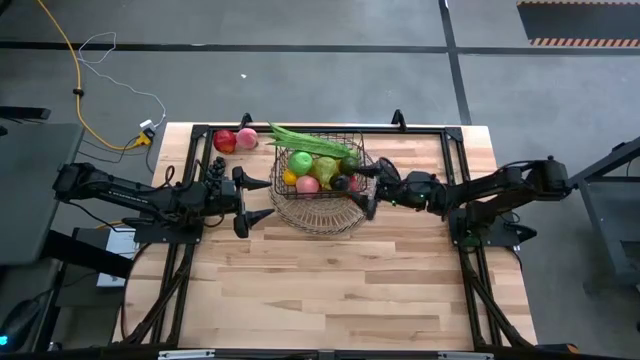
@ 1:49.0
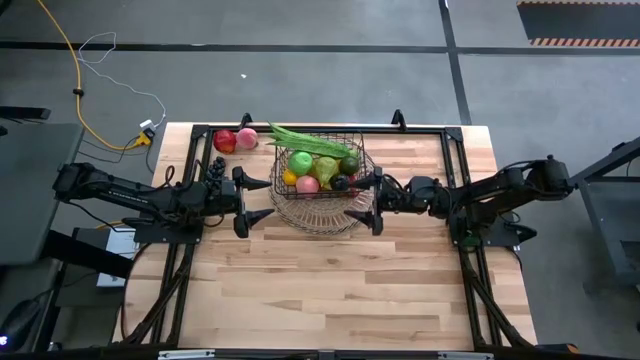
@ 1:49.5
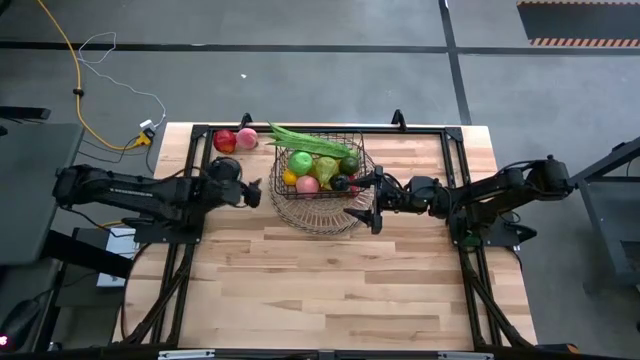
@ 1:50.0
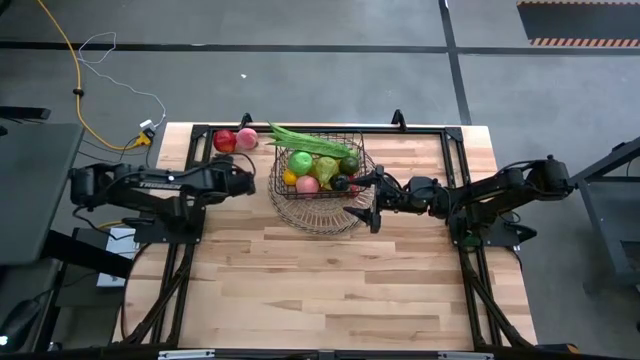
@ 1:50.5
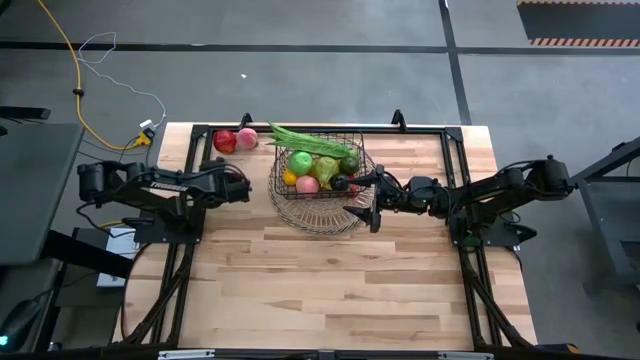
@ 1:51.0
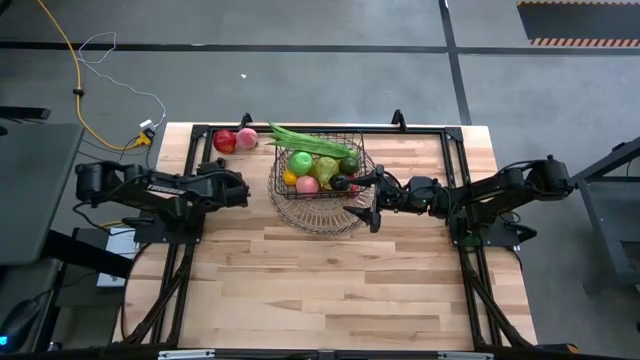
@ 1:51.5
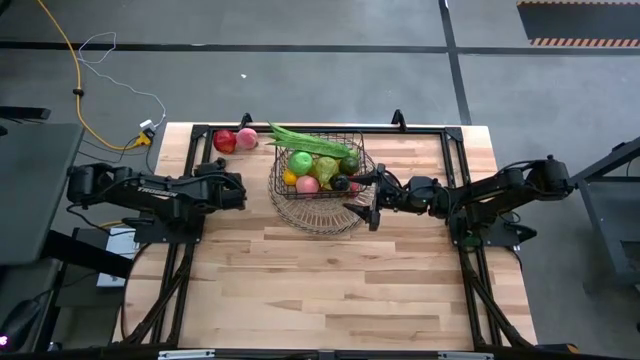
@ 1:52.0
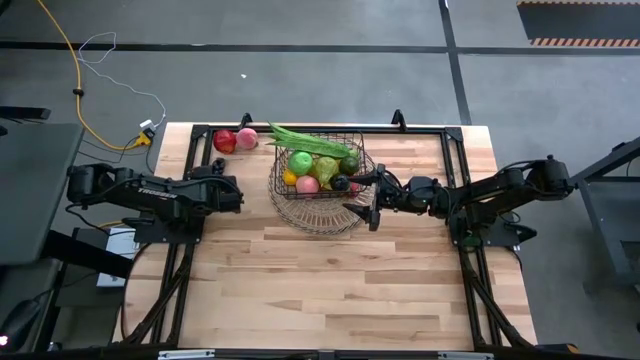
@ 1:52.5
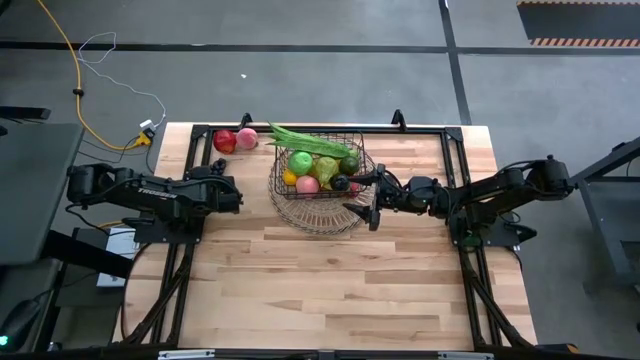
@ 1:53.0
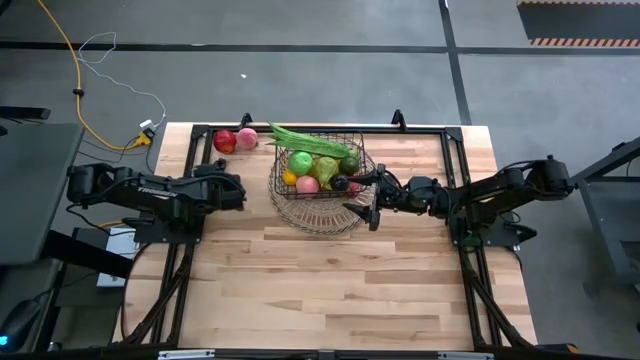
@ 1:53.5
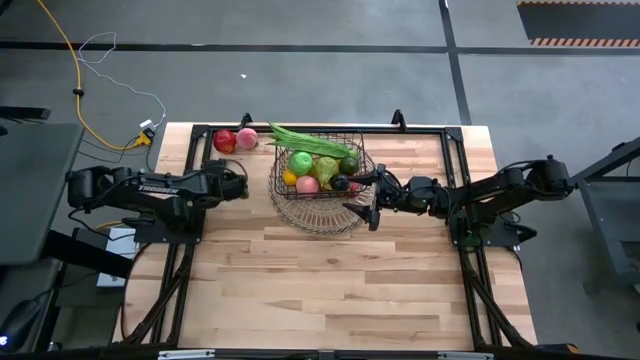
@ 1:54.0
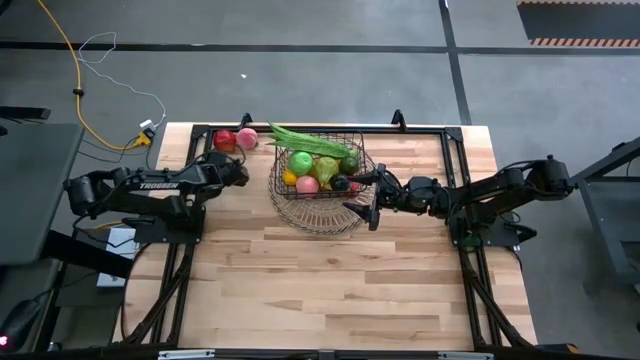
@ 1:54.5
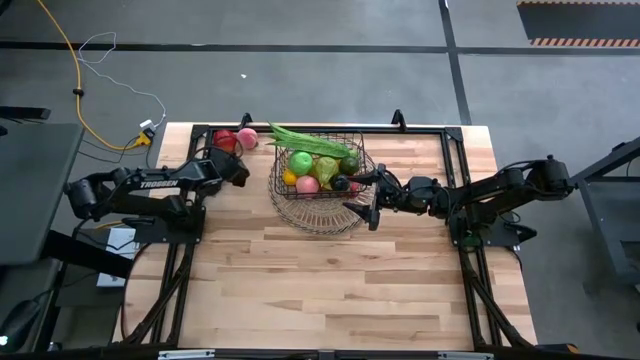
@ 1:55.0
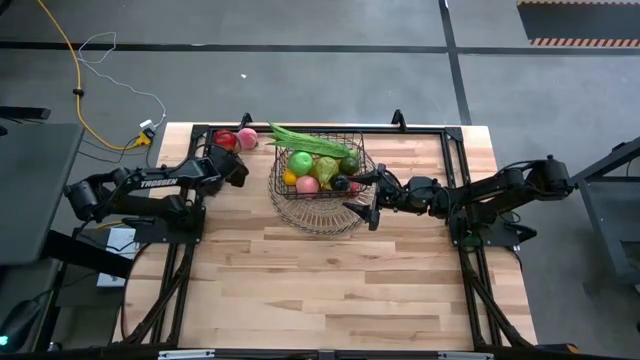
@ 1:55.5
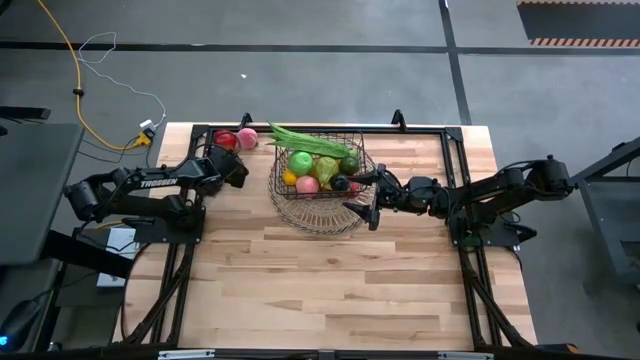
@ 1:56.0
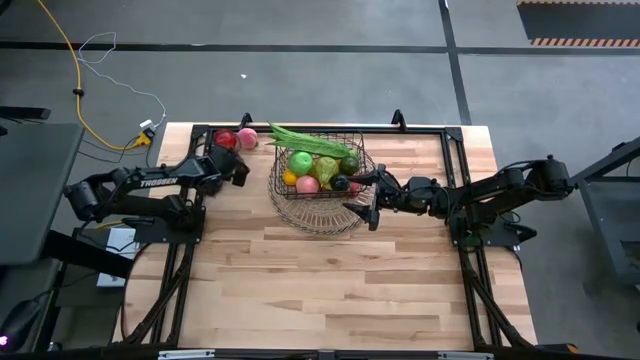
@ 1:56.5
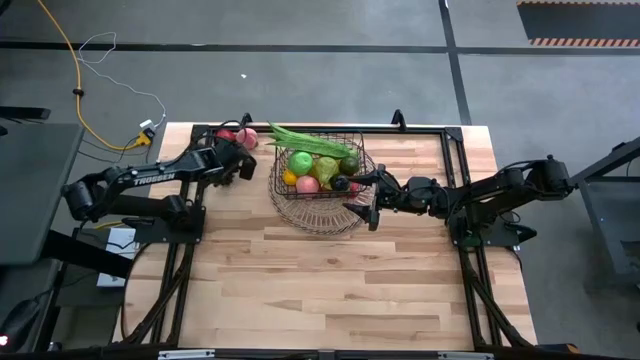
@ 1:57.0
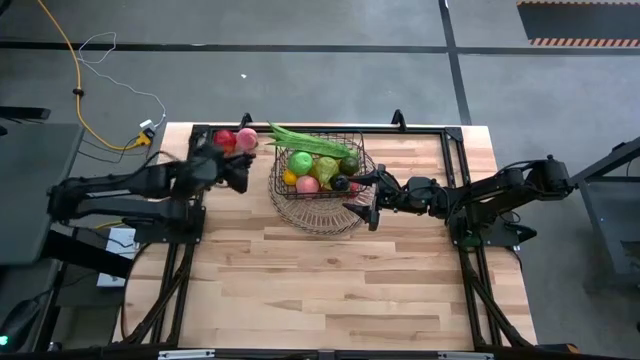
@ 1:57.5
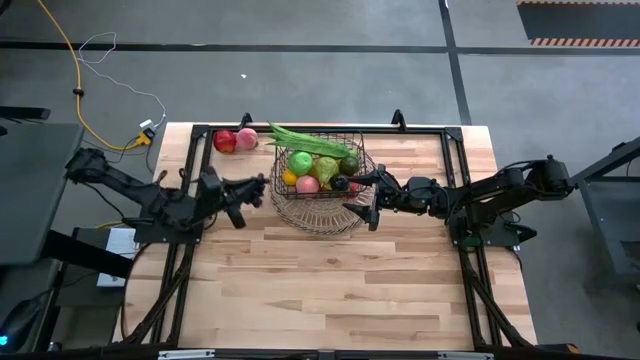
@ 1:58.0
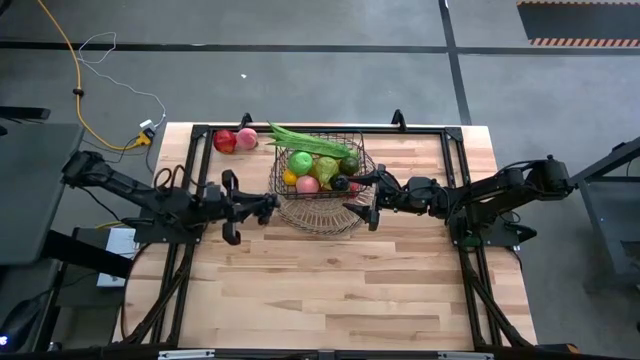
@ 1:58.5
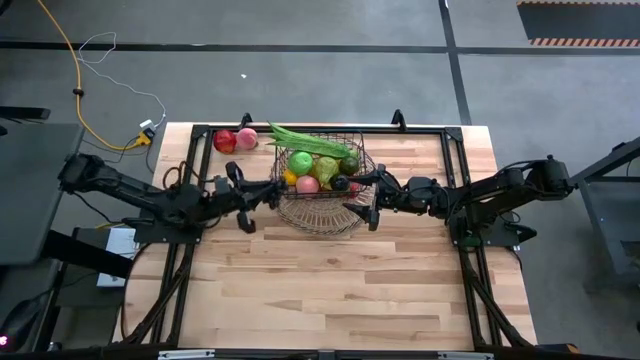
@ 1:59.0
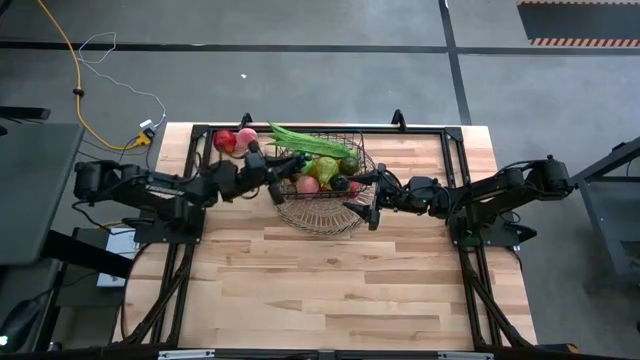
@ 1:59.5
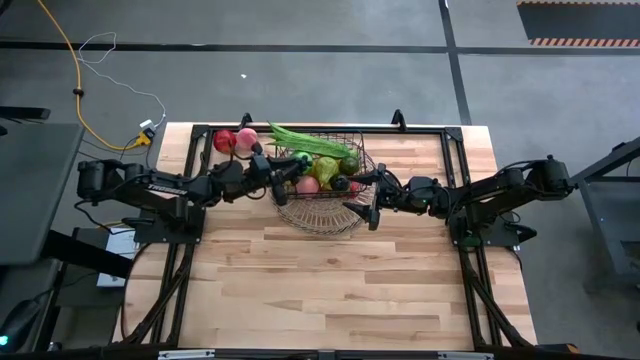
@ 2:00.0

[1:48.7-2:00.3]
Task: Build produce basket
Put the grapes into the wire basket

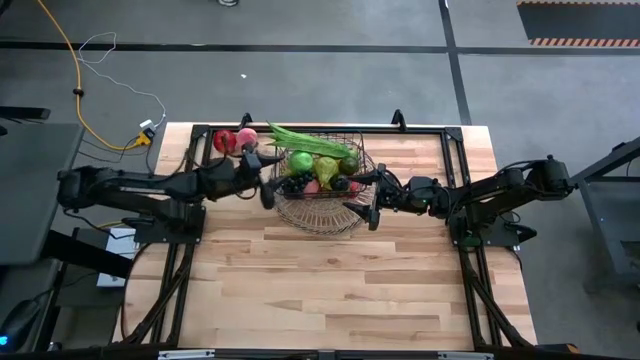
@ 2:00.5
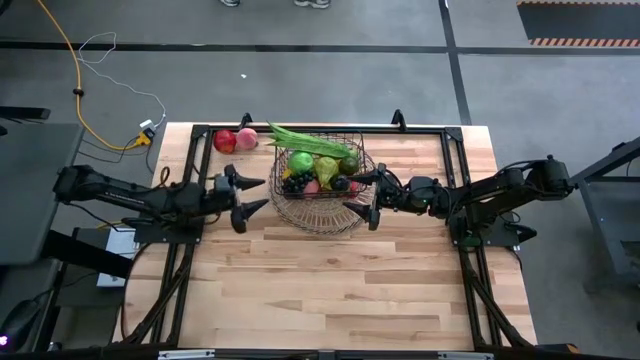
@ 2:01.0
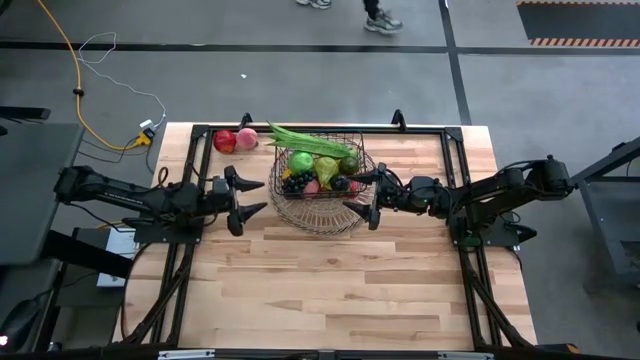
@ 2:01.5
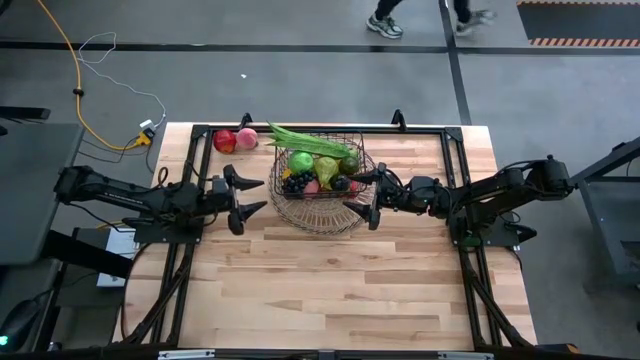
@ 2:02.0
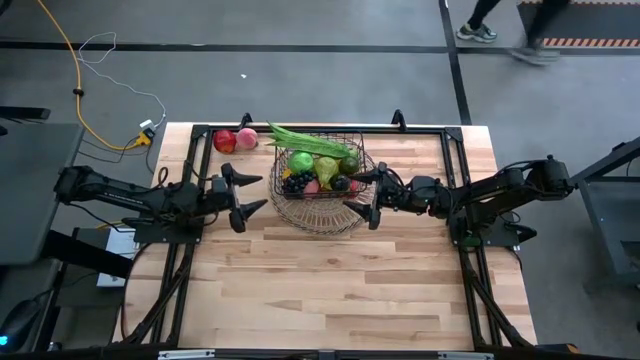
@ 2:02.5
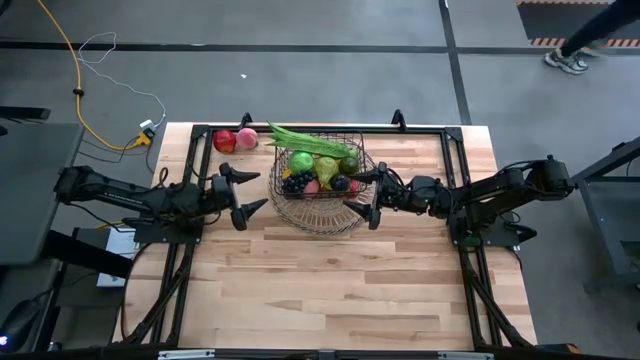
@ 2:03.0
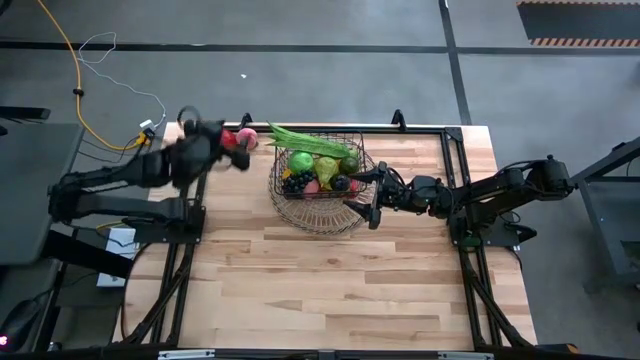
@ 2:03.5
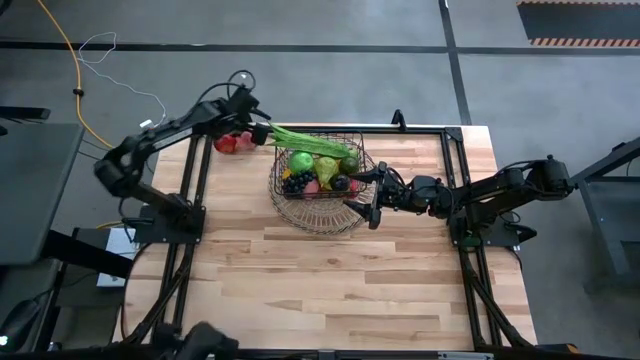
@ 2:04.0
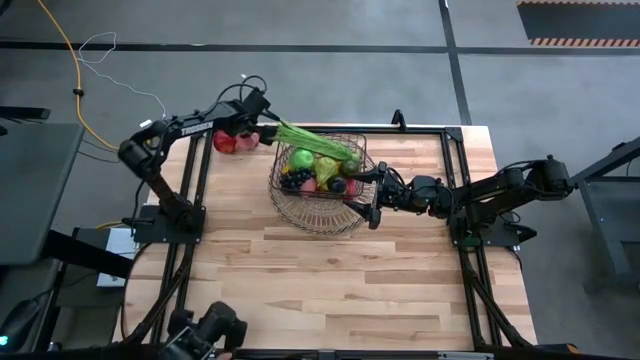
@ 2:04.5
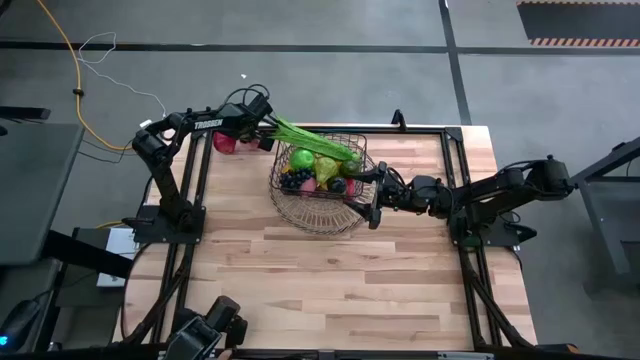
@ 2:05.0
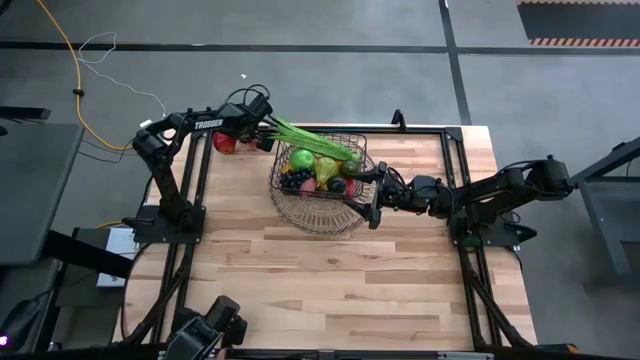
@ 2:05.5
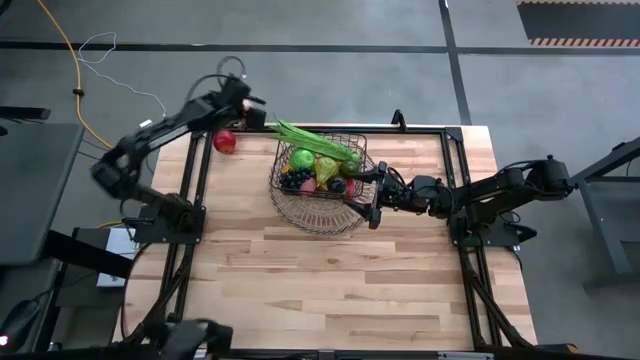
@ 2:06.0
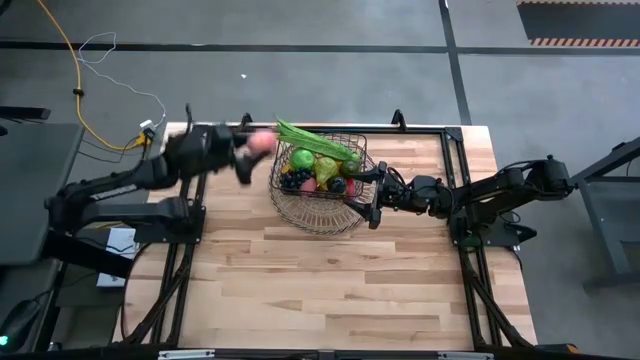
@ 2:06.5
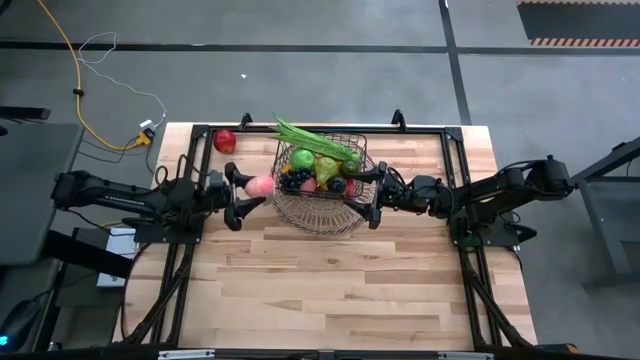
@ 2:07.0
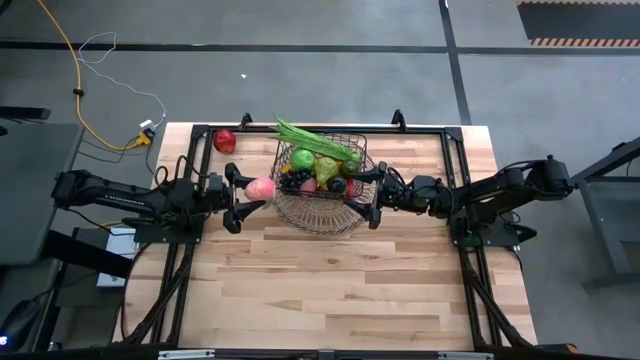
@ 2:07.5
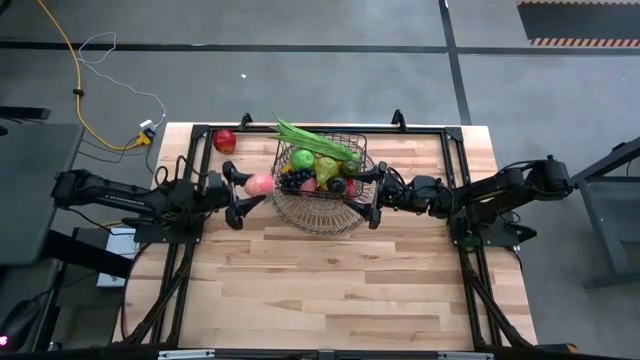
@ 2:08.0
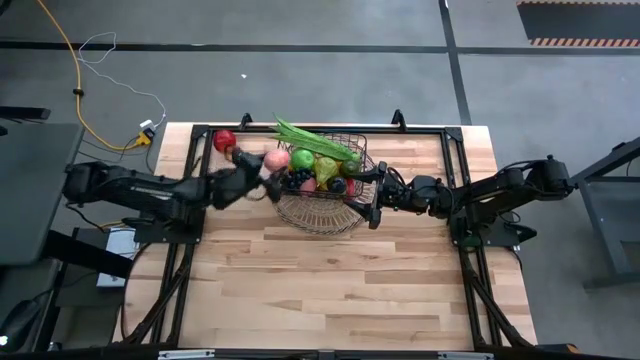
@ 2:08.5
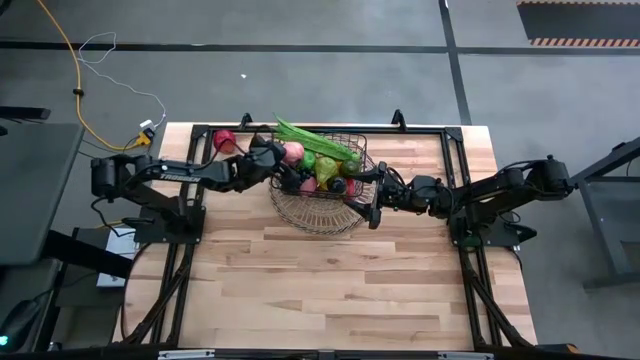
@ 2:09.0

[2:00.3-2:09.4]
Put the peach into the wire basket

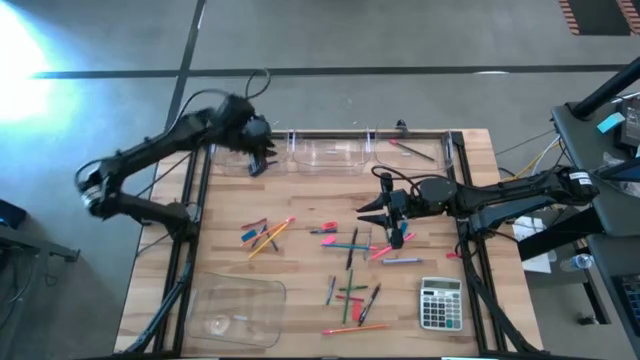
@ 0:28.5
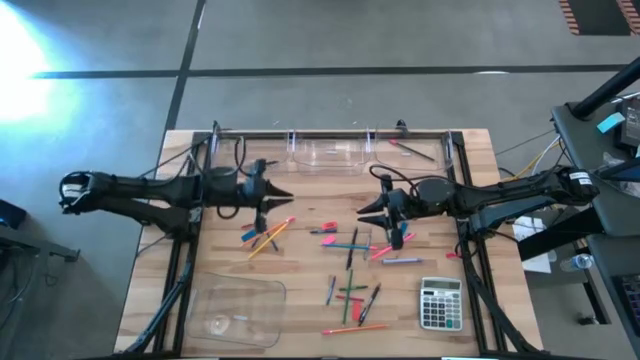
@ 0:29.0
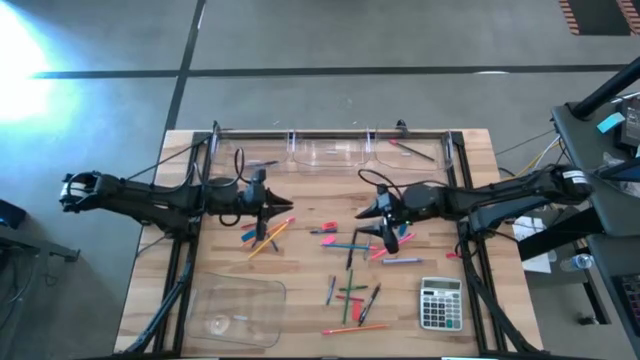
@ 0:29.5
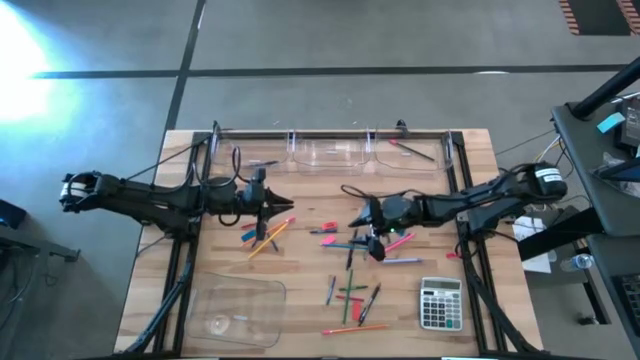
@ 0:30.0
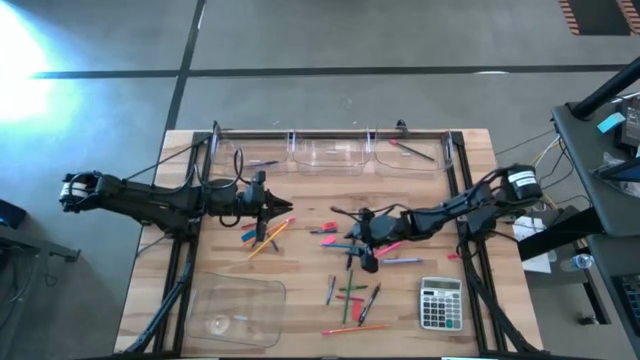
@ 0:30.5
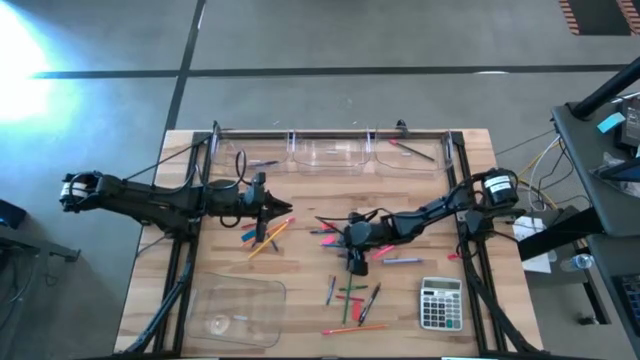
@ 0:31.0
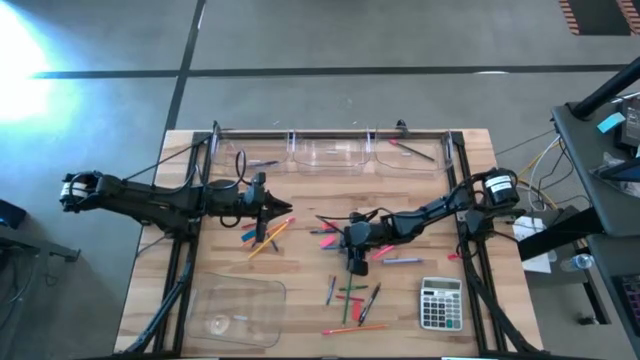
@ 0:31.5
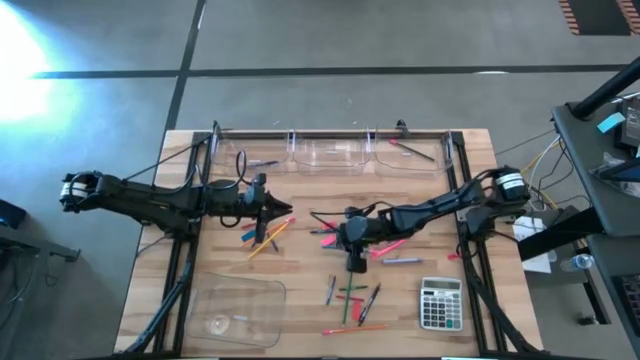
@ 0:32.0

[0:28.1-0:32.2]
Task: Sort crayons/erasers/pens/pencils in bins
Put the blue pencil into the top right transparent bin
